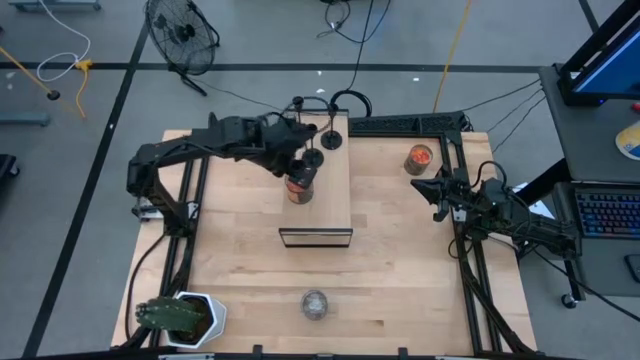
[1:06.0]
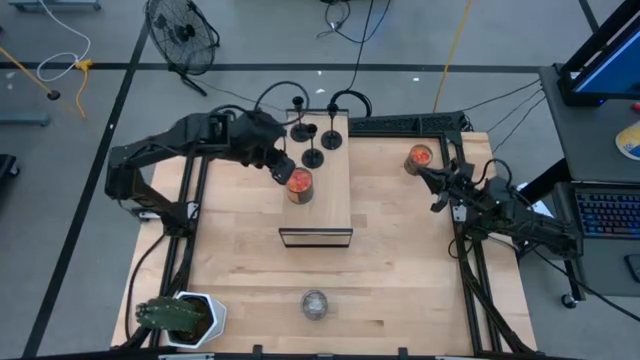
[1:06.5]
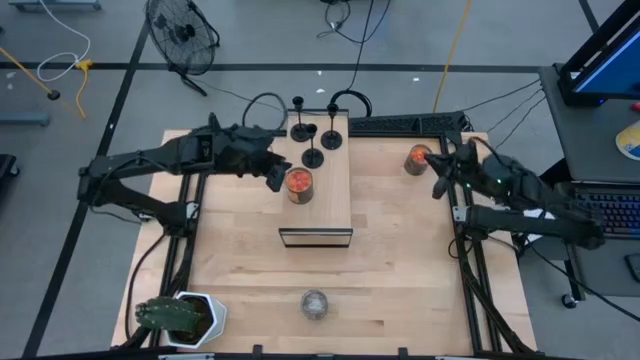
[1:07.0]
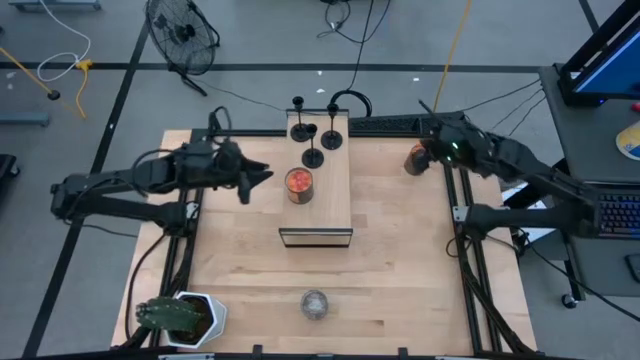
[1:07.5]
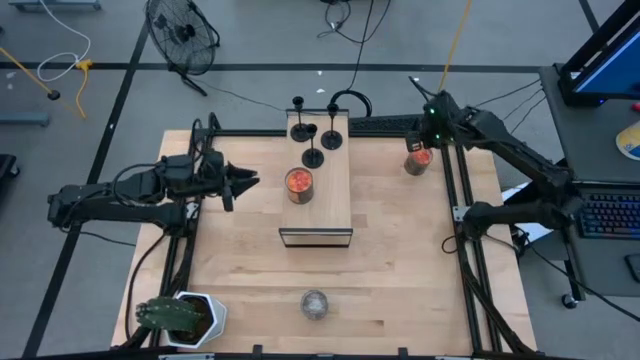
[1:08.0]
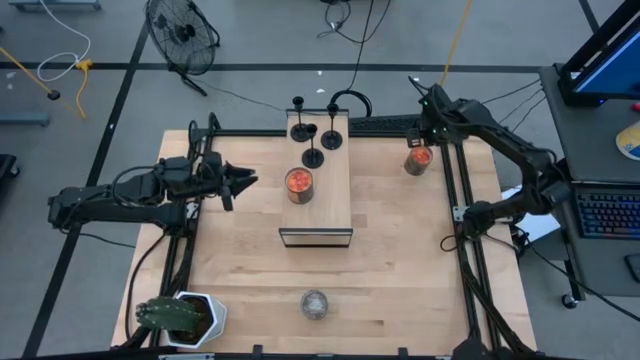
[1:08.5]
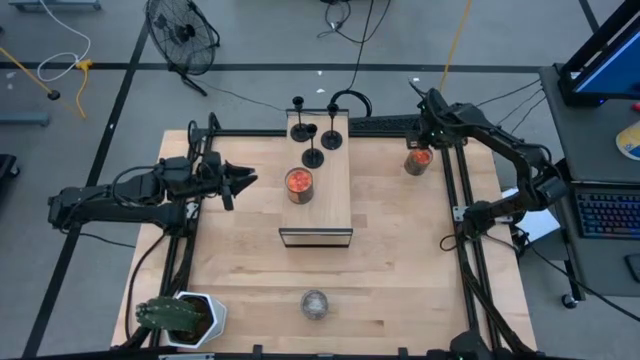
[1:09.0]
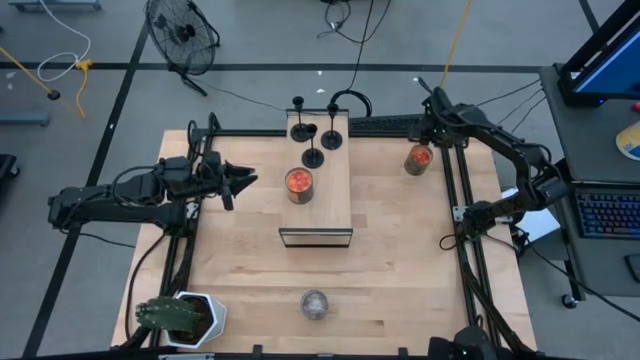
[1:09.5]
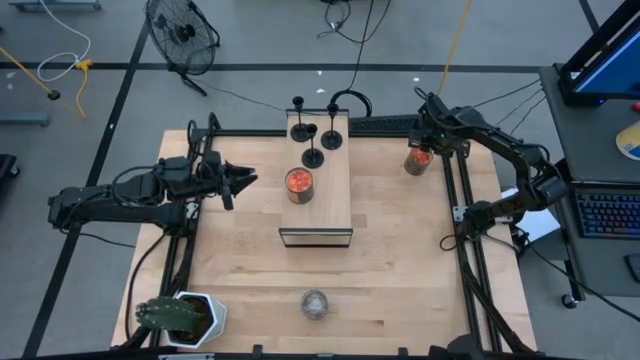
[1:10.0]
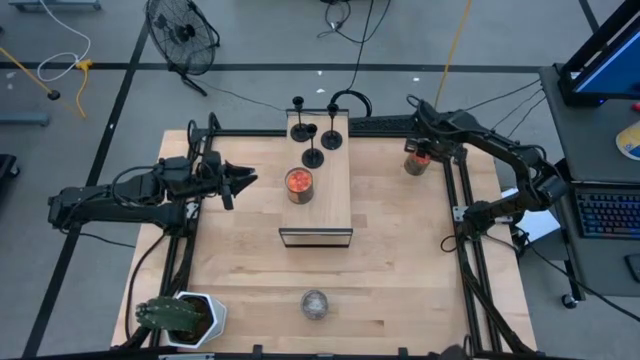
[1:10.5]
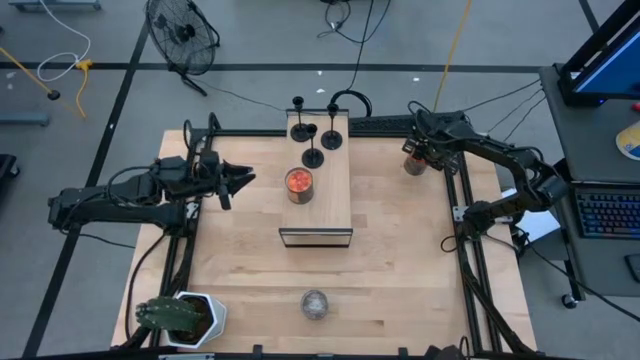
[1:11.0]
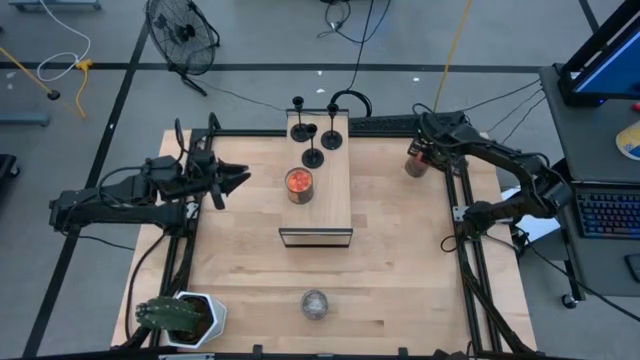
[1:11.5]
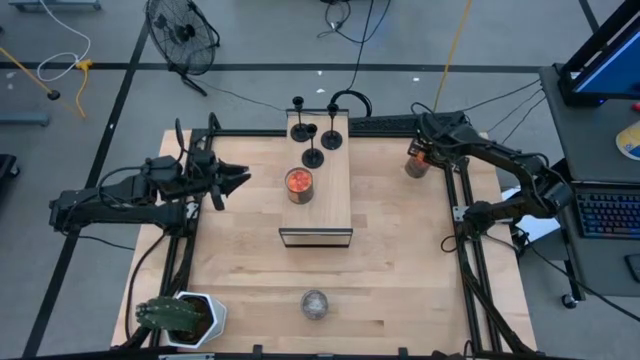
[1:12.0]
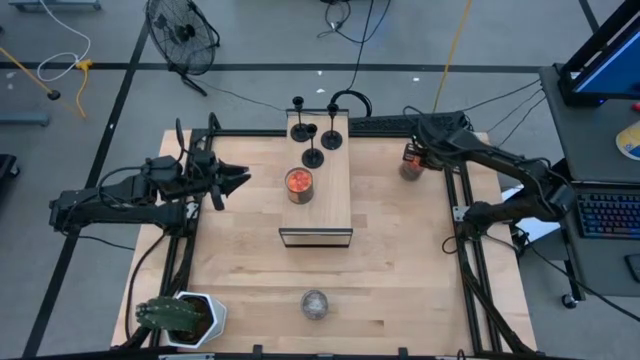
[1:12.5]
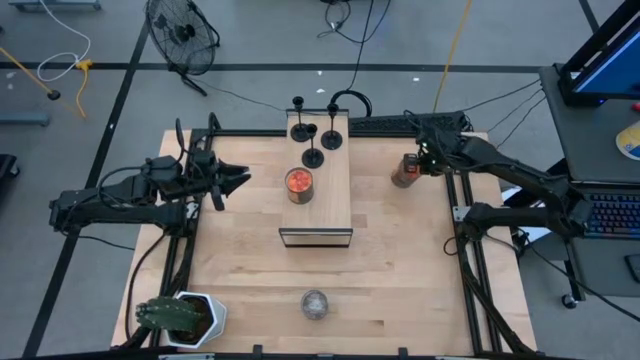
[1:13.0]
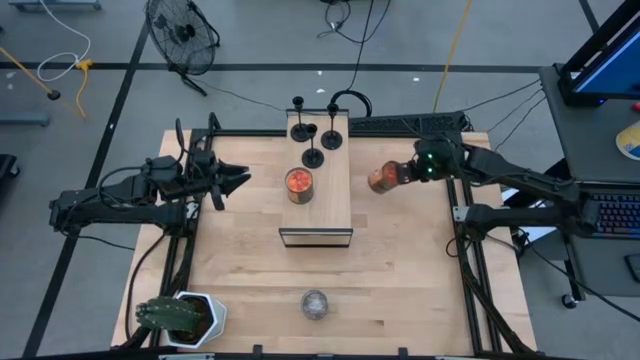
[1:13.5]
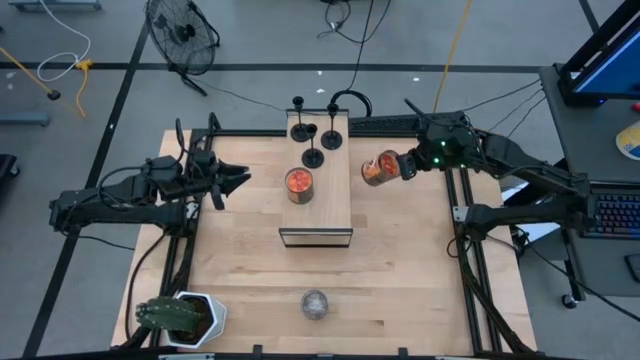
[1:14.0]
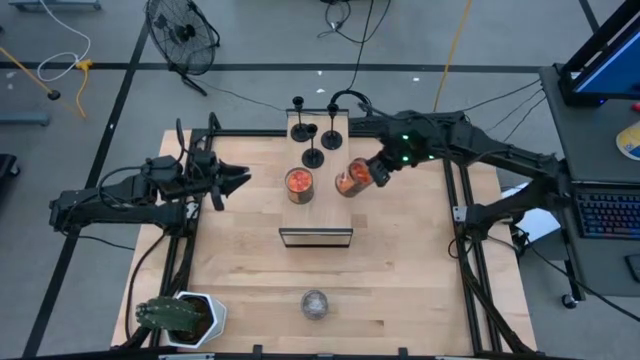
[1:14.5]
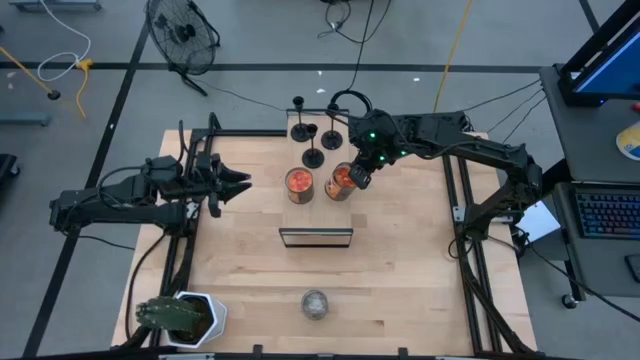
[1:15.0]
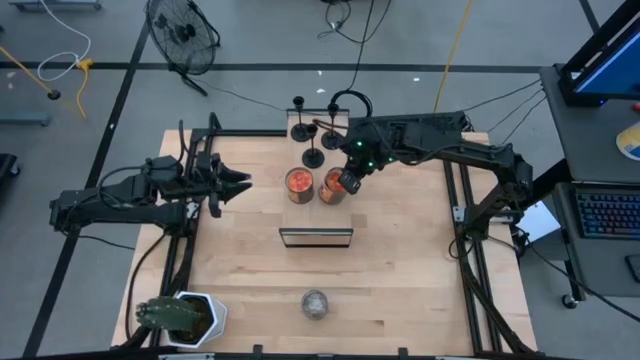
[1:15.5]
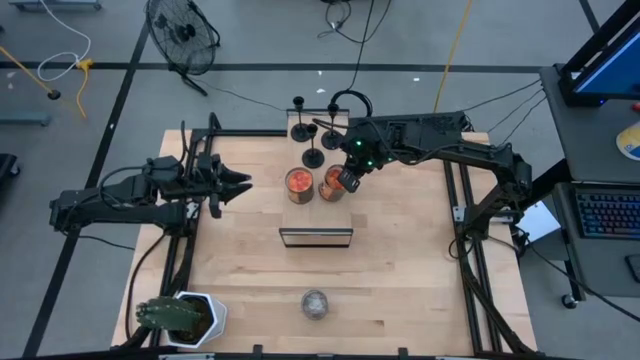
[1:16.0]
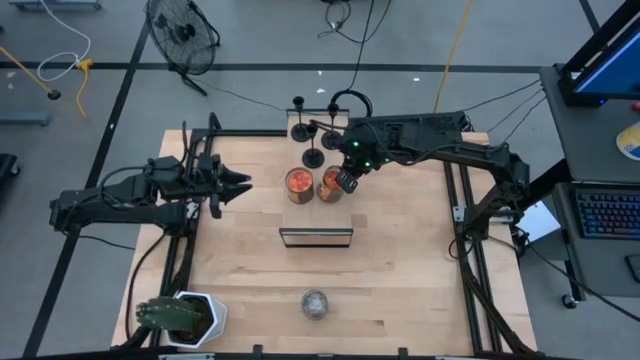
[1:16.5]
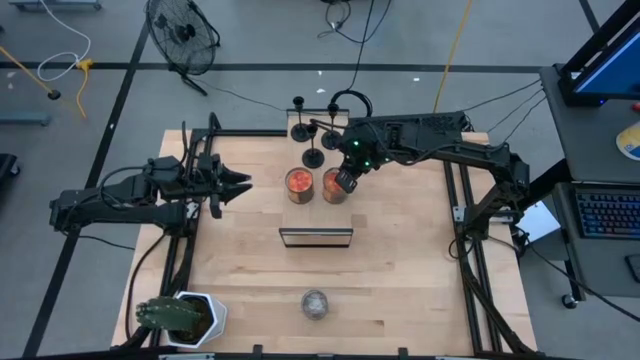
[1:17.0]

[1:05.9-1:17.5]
Task: Pick & Place candle stick holders
Put the orange container candle on the shelf

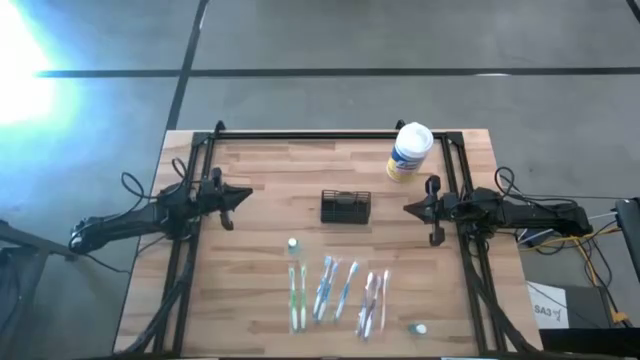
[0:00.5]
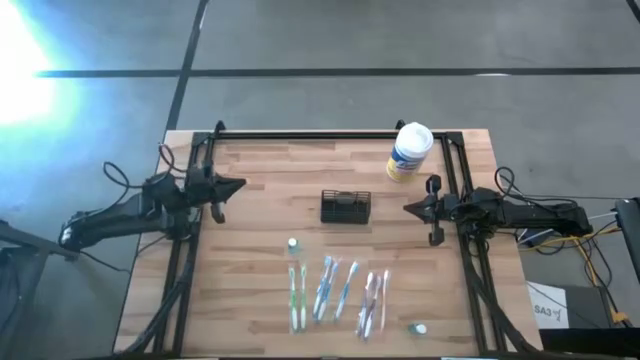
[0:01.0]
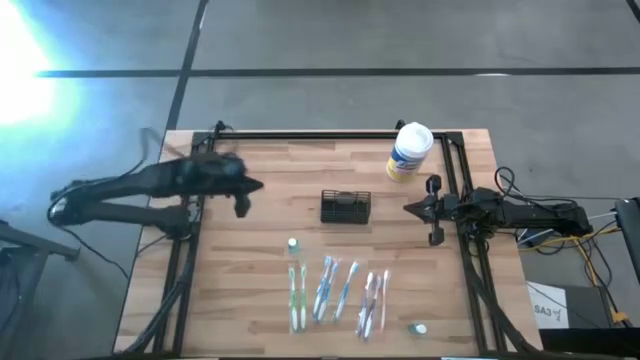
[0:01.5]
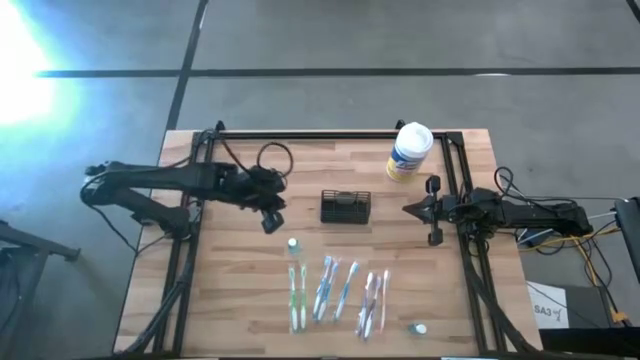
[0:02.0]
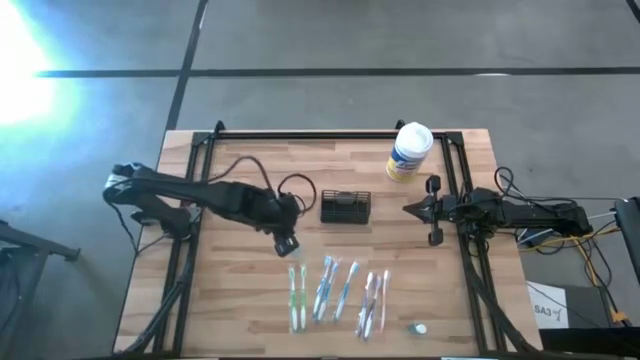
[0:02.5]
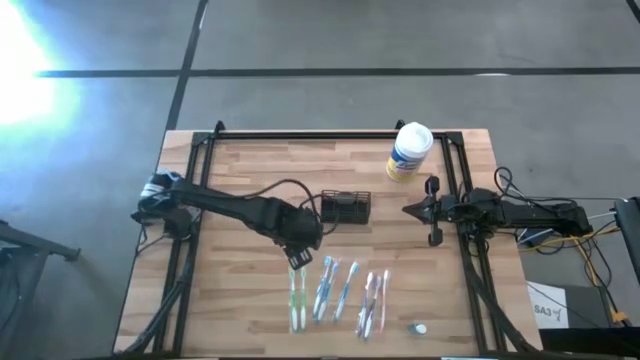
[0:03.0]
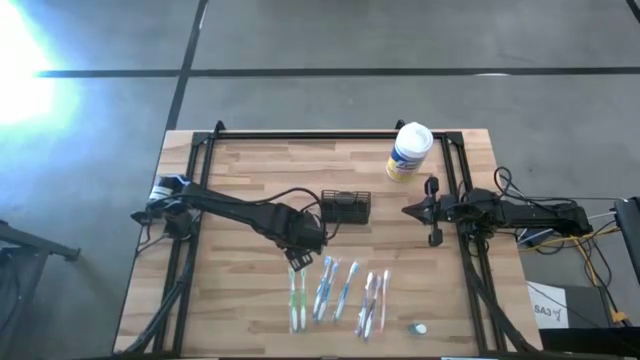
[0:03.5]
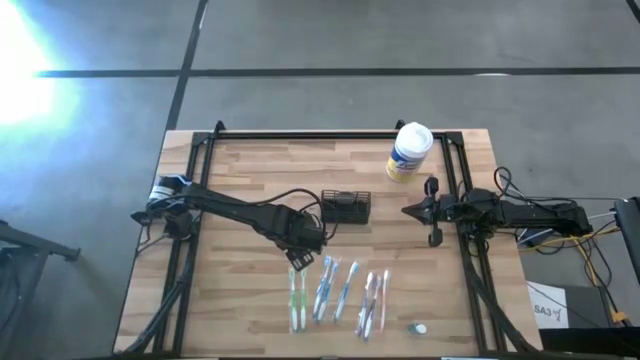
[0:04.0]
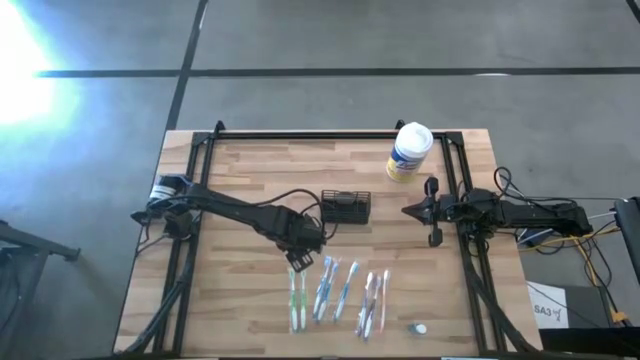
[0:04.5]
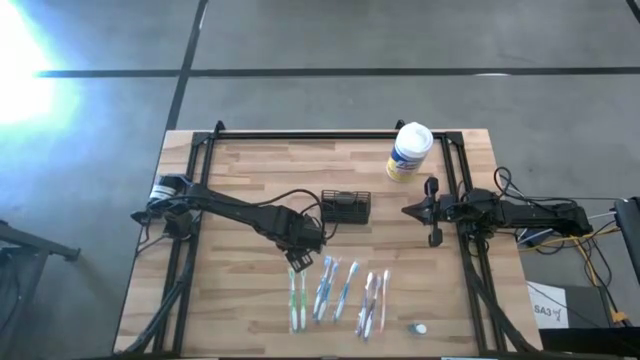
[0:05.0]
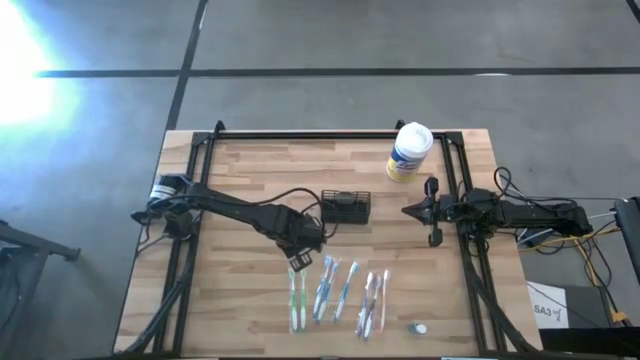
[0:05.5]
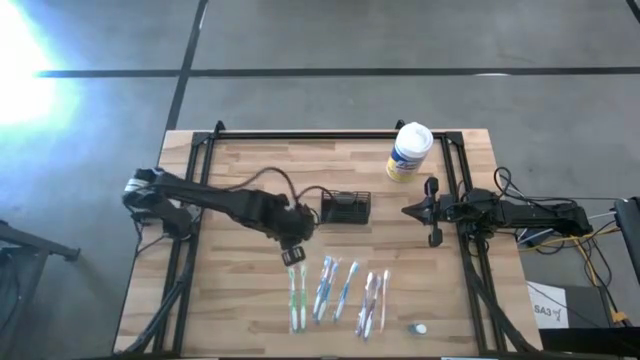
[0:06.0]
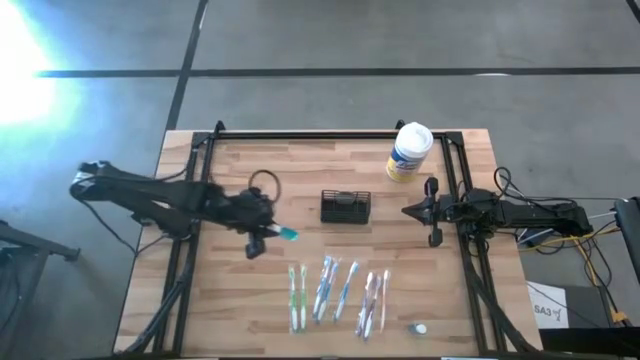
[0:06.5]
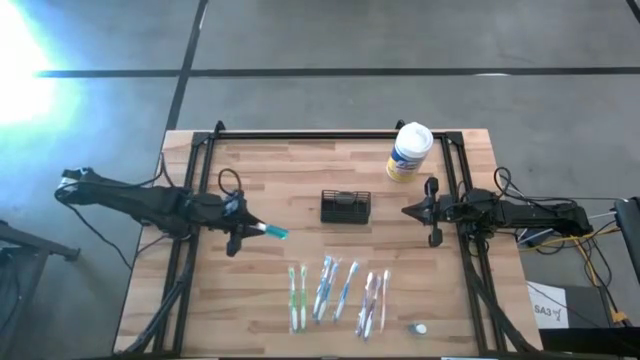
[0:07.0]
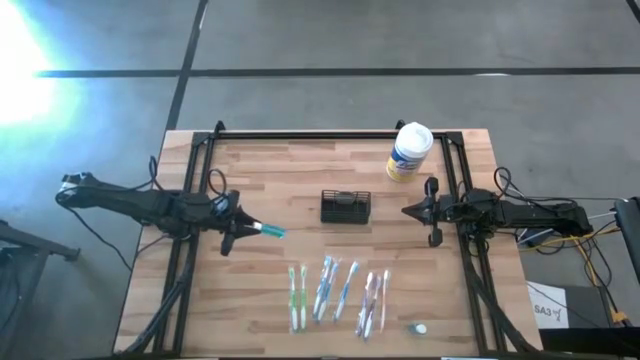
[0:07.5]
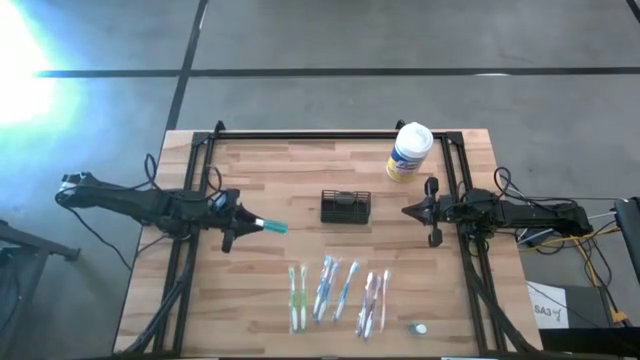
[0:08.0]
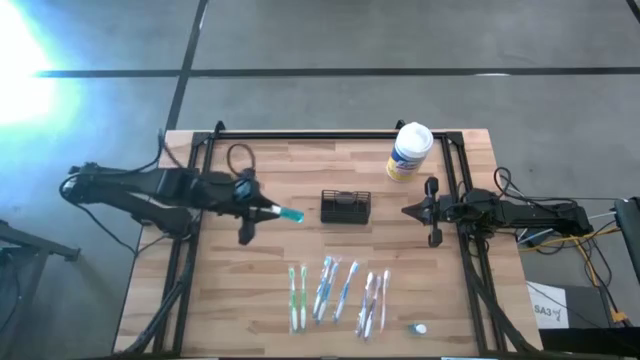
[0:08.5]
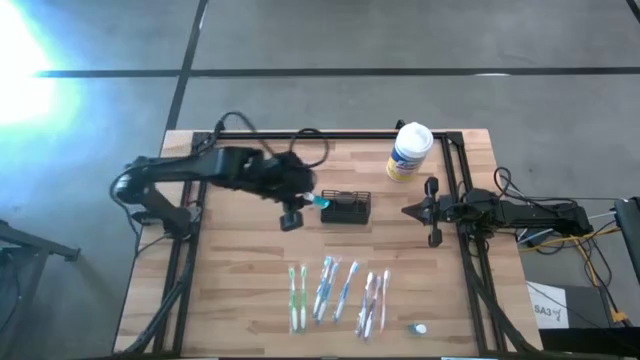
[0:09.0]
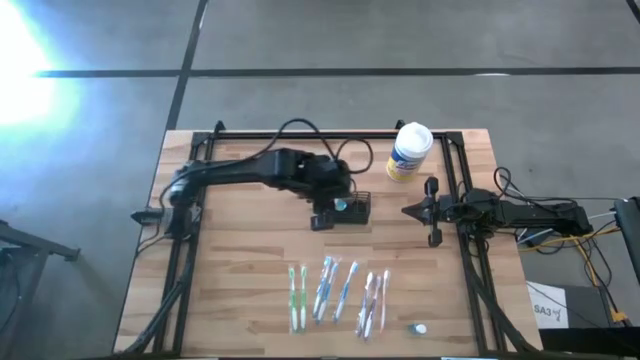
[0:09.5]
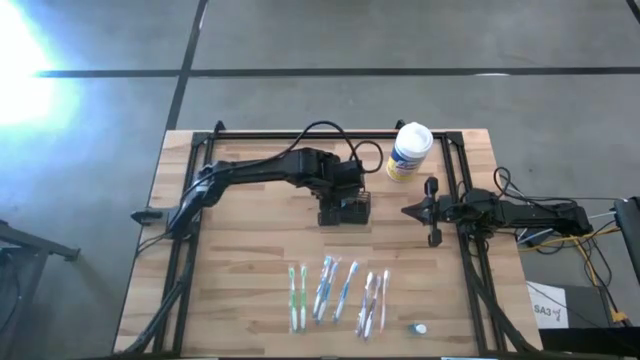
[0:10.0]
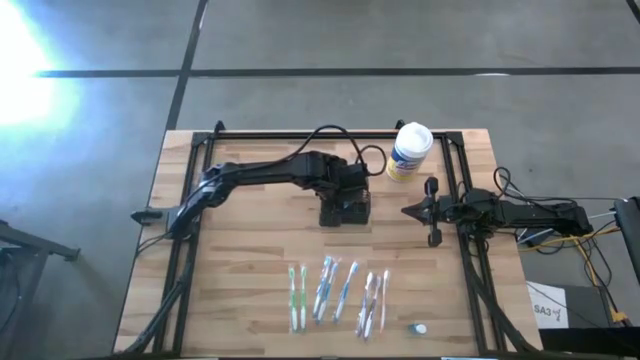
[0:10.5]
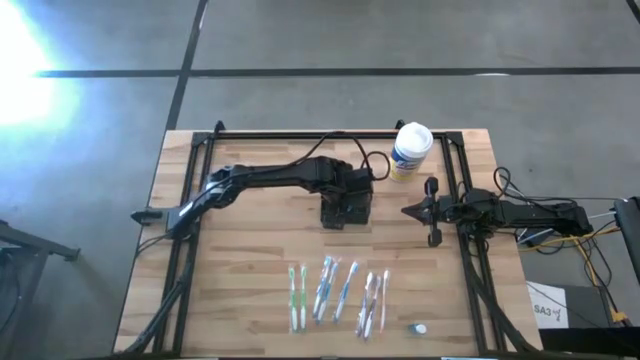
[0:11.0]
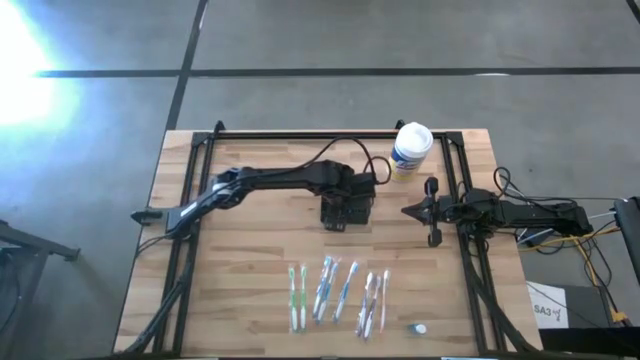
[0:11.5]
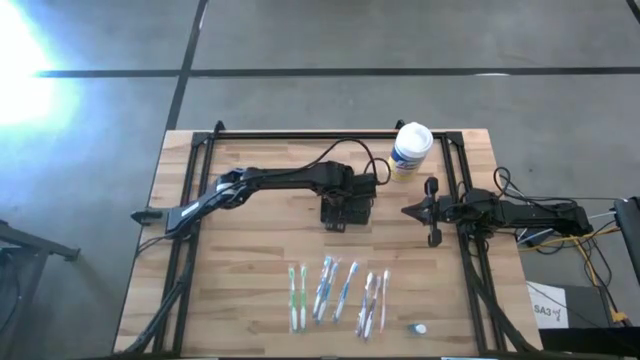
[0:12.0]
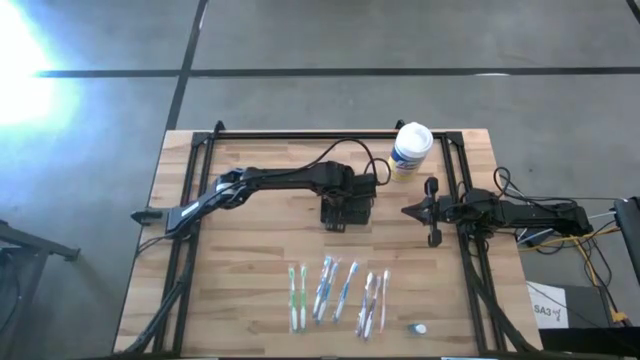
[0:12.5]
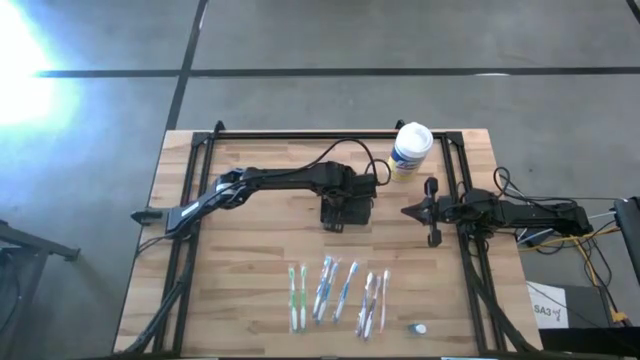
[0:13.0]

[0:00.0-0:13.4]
Task: Pick & Place toothbrushing station
Put the left blue mouthwash into the wire organizer
